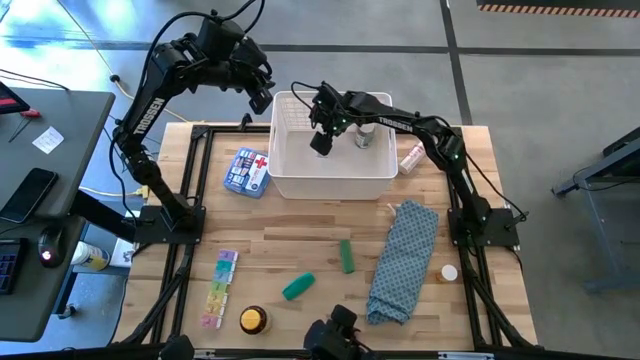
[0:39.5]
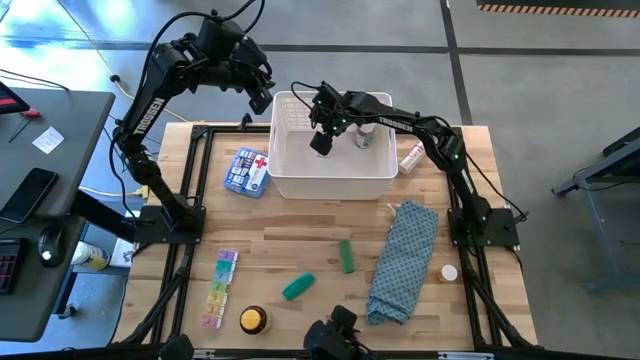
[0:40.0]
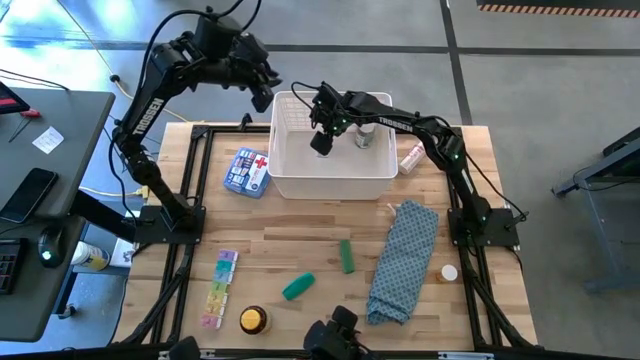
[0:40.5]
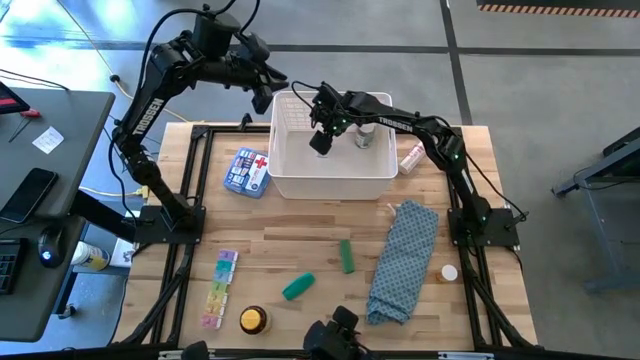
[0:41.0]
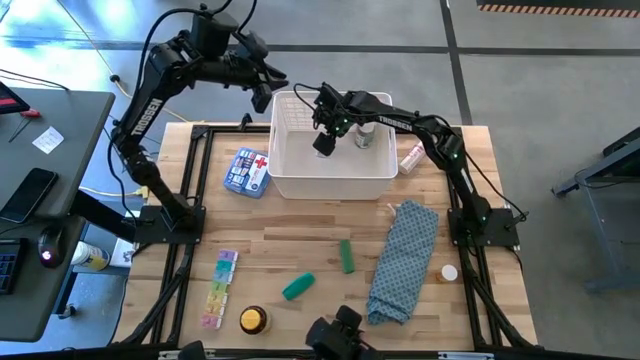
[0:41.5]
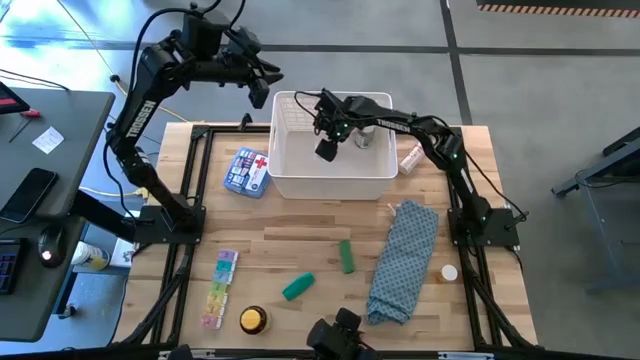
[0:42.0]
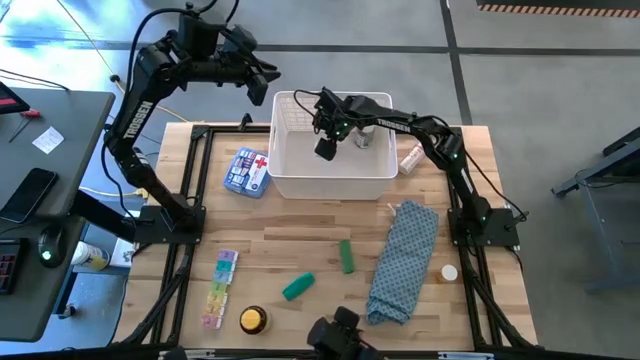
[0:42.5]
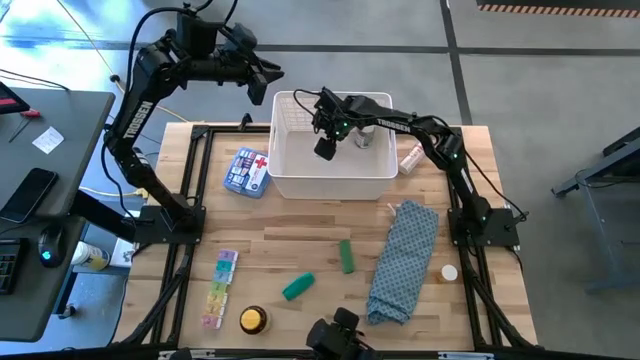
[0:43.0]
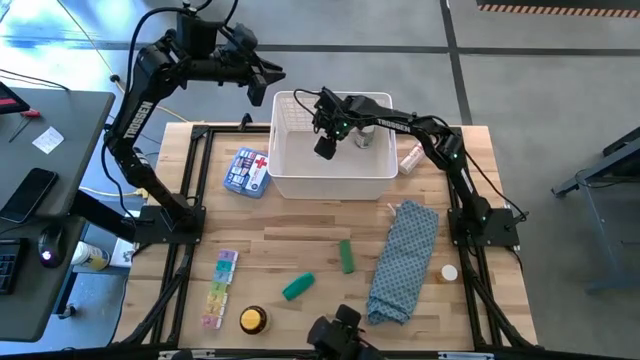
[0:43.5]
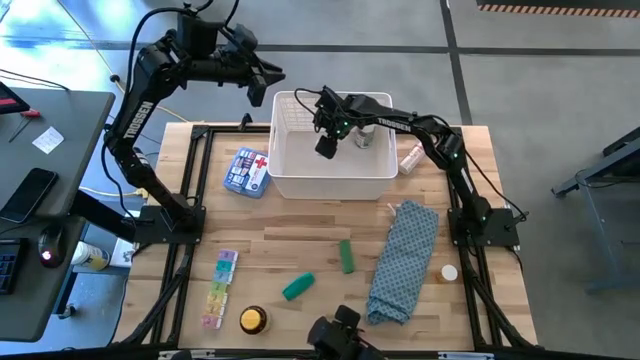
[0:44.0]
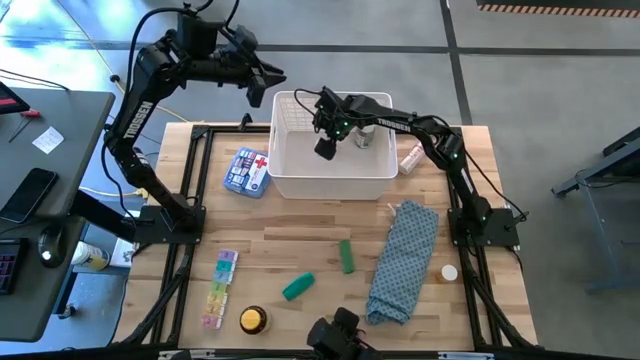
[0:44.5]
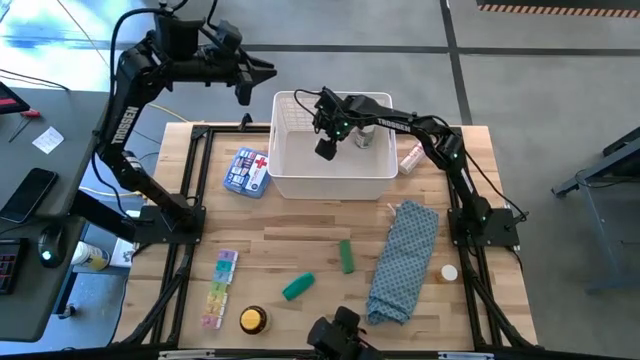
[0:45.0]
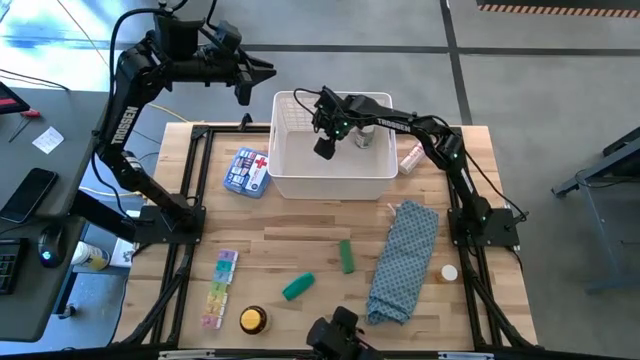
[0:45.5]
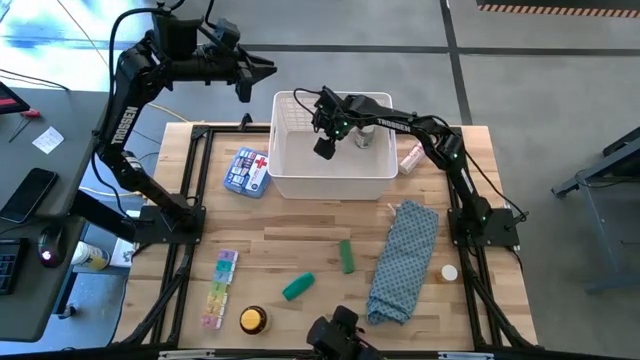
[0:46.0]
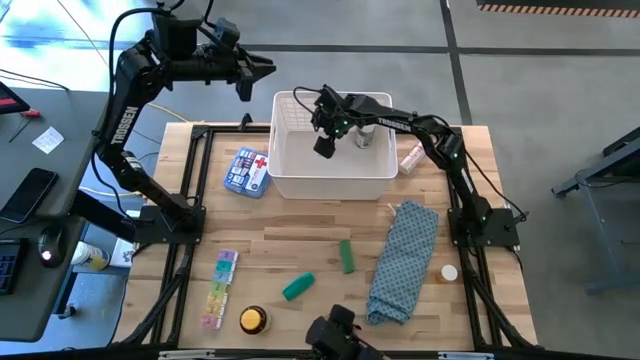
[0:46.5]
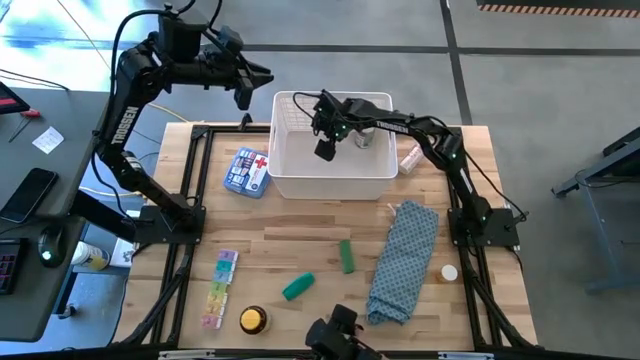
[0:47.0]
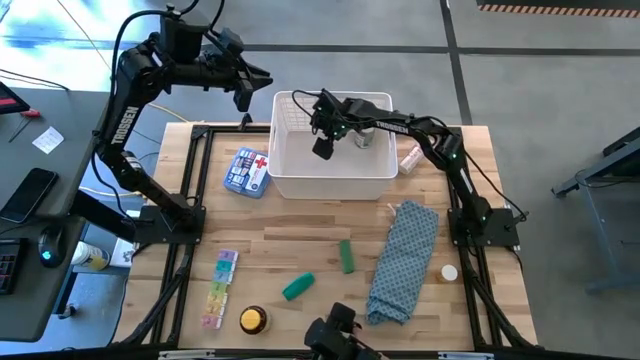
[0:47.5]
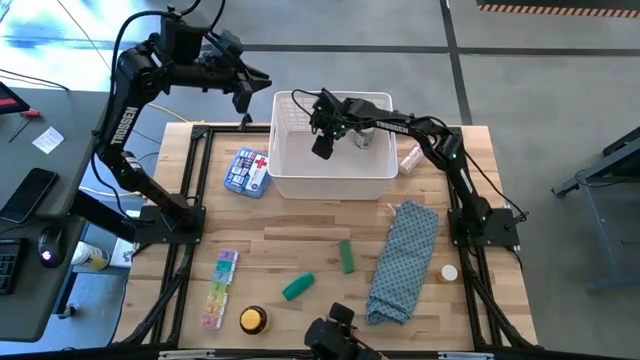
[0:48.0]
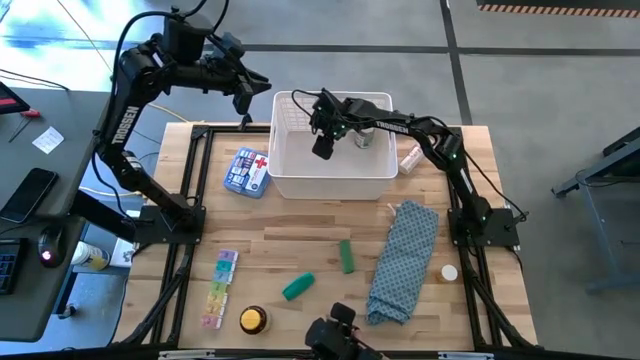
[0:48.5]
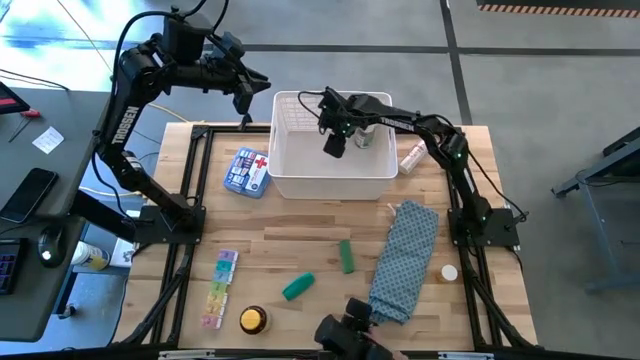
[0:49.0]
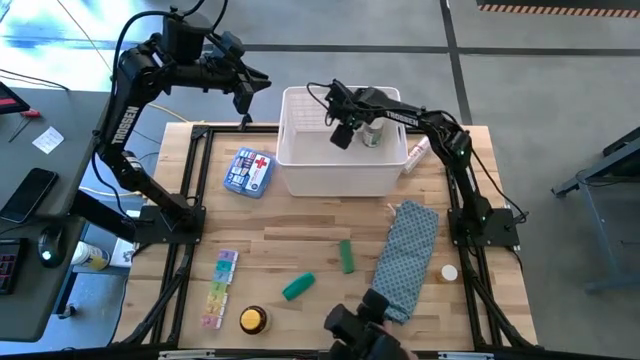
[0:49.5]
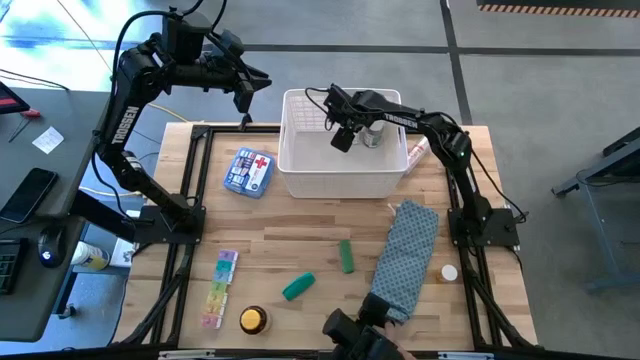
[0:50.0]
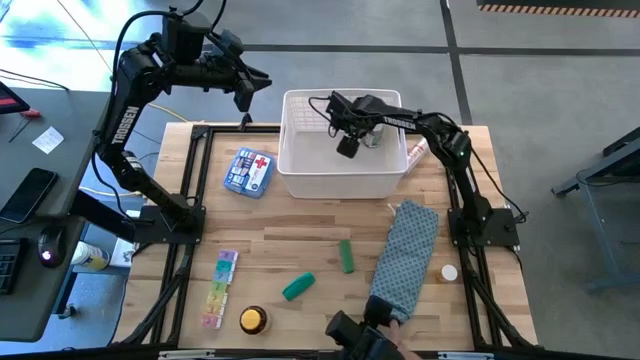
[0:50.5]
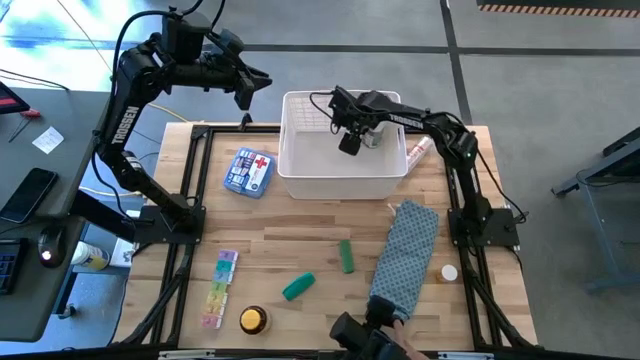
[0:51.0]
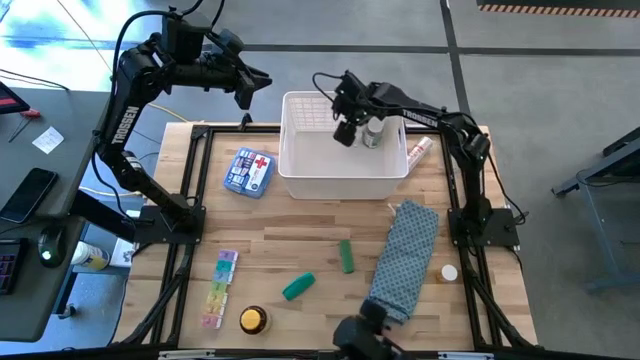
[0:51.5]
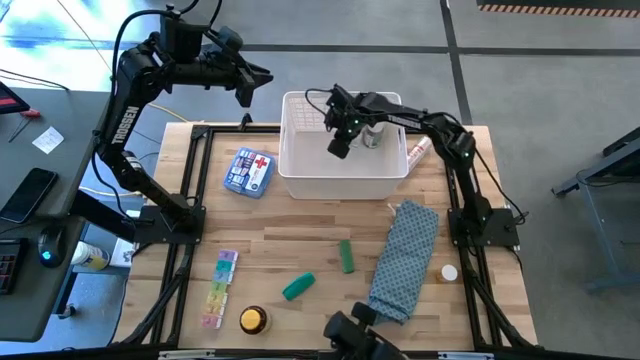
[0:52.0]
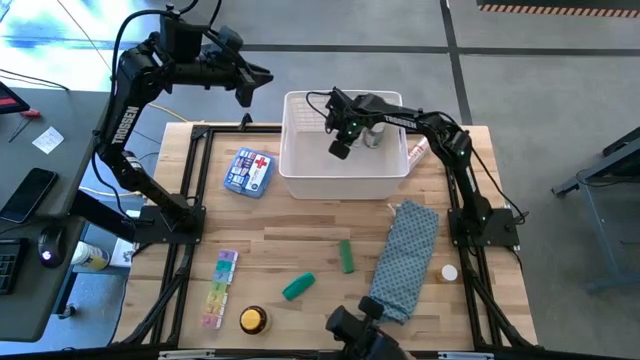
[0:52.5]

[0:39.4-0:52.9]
Task: Pick & place medical supplies in basket/bin
Put the white pill bottle into the white bin

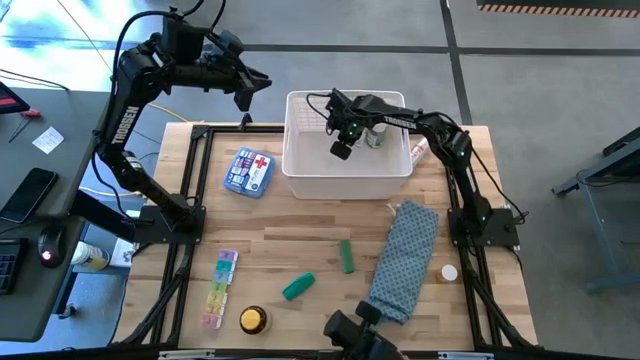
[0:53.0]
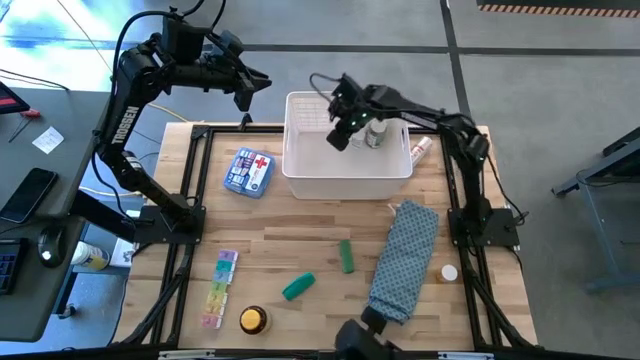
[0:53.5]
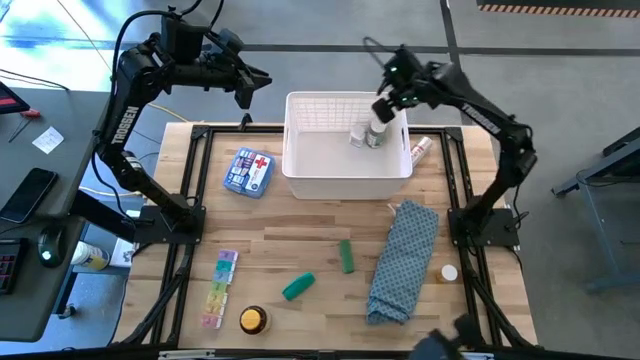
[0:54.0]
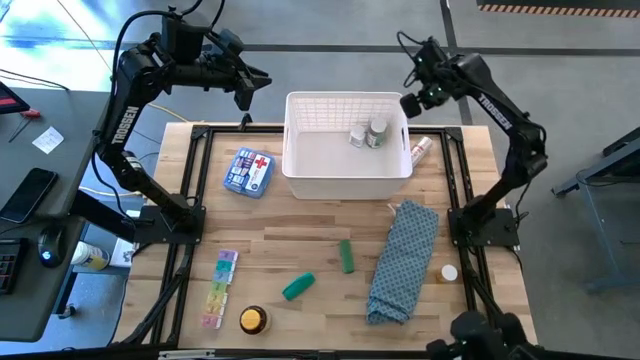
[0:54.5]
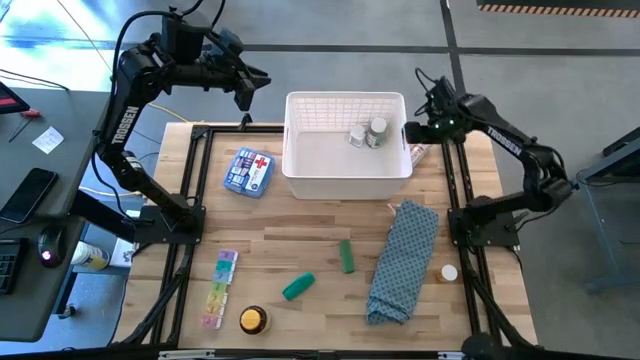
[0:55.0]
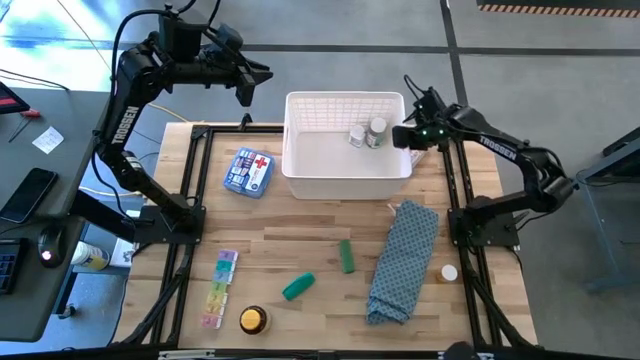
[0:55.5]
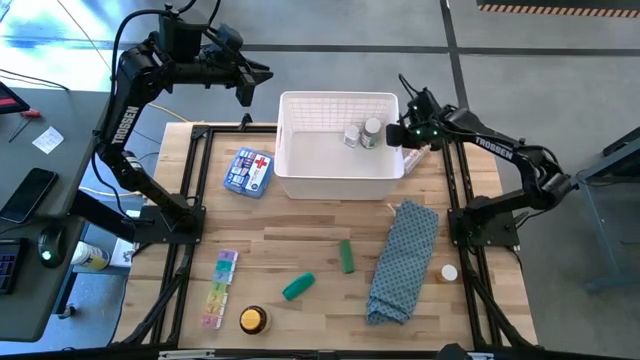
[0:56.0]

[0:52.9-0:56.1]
Adjust the white bin

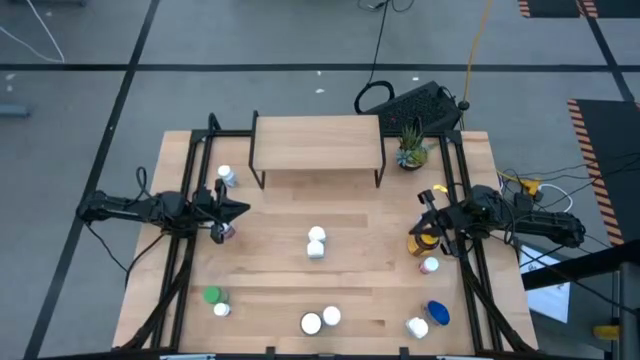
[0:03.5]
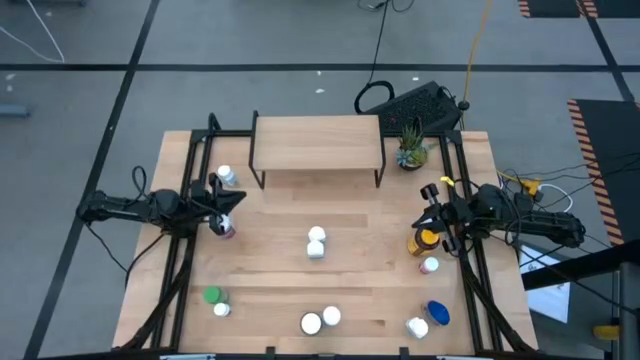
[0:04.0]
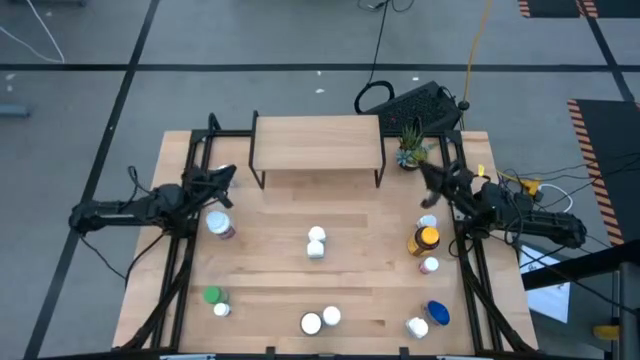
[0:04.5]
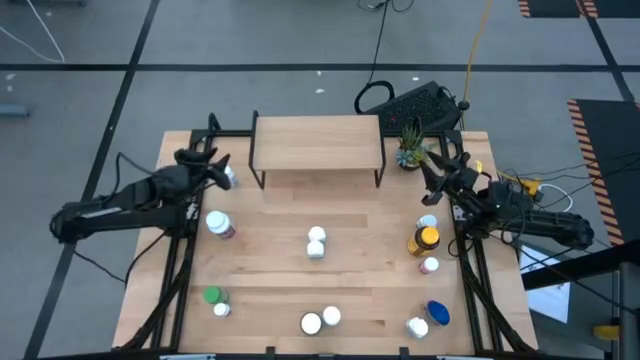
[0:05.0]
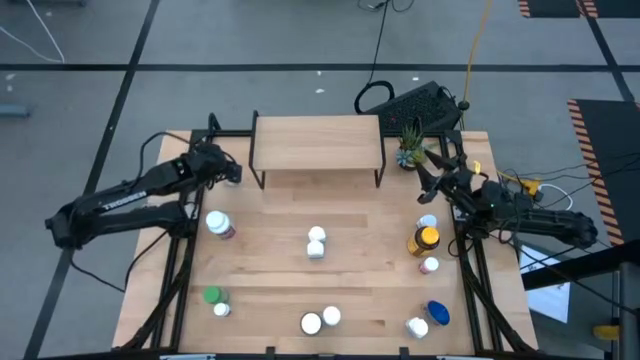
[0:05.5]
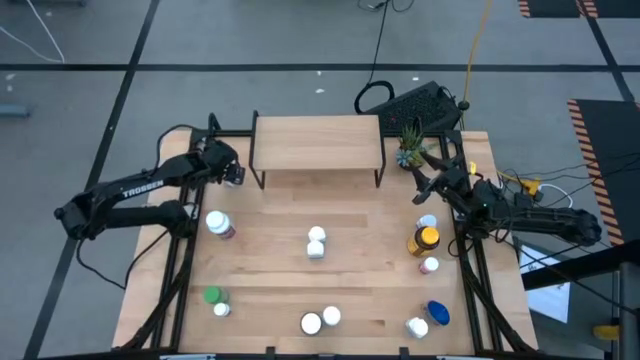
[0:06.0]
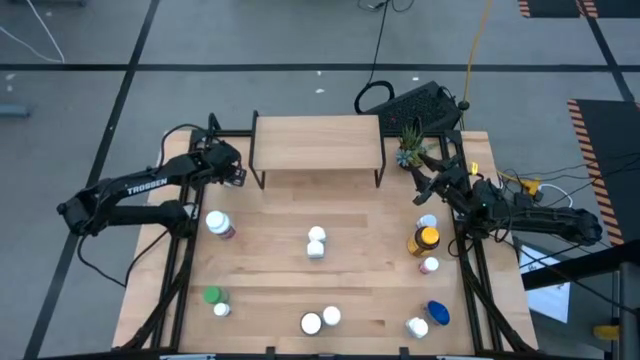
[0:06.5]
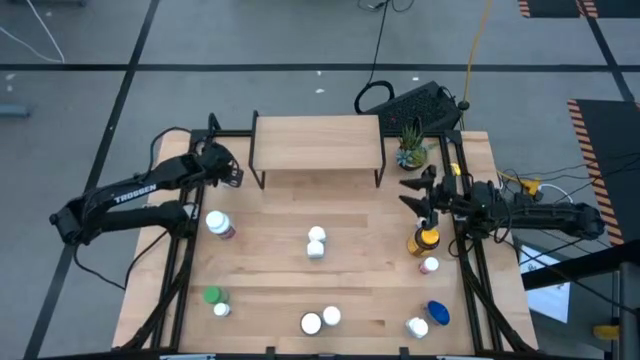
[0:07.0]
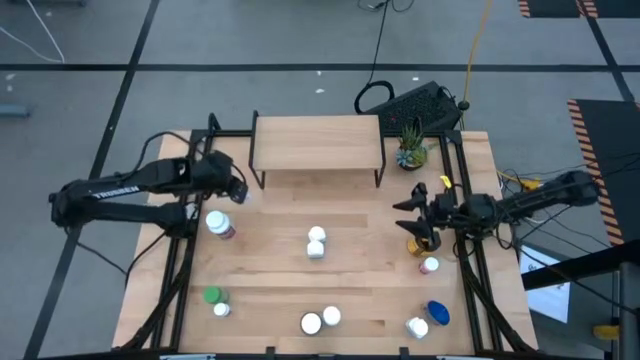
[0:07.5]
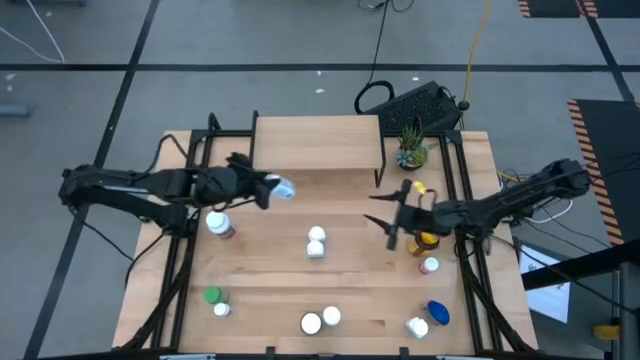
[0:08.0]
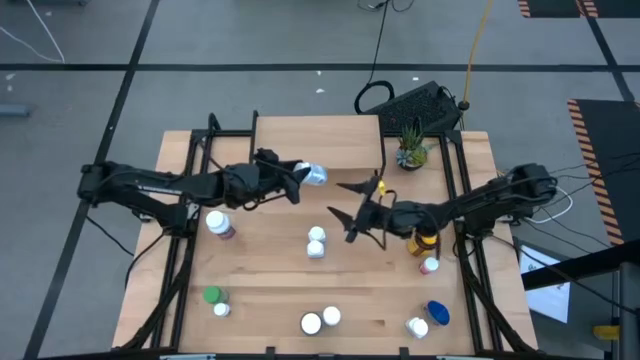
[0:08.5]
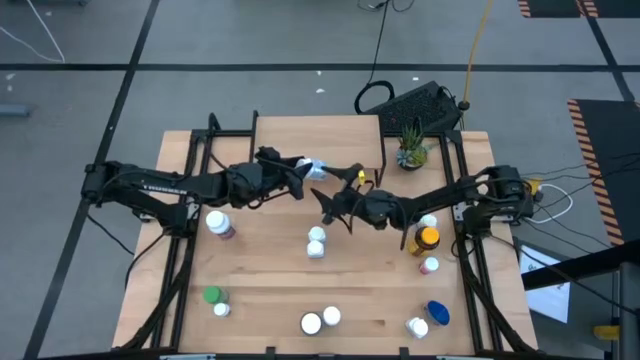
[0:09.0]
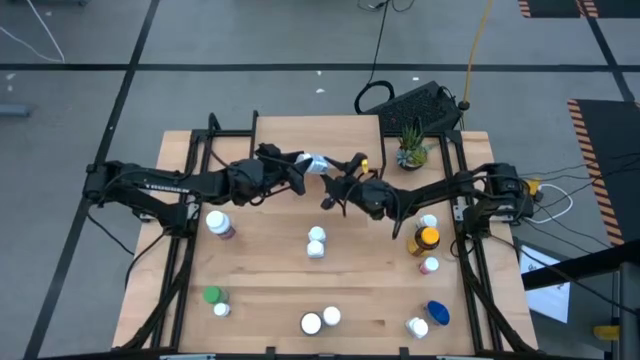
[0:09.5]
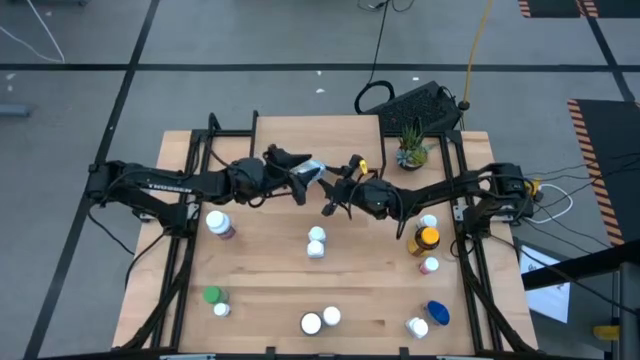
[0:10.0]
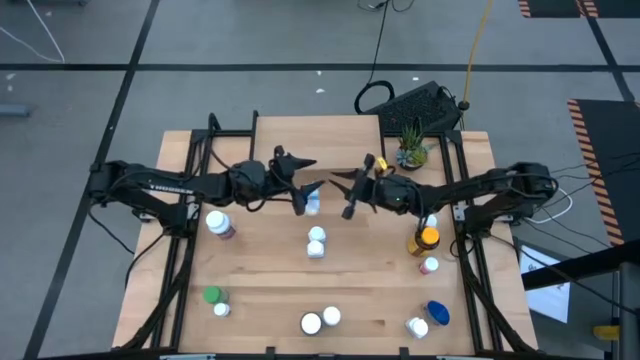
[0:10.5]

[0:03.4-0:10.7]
Task: Pick and place medicine bottles onto shelf by color
Put the white pill bottle on the shelf
